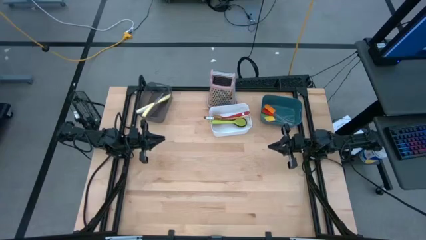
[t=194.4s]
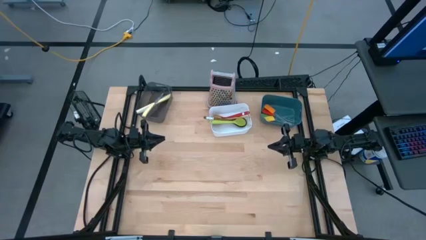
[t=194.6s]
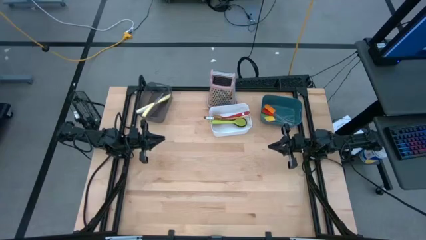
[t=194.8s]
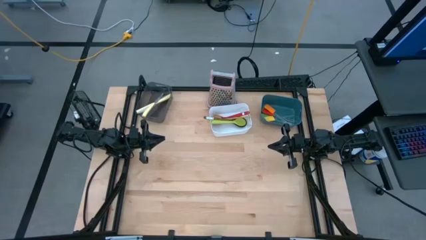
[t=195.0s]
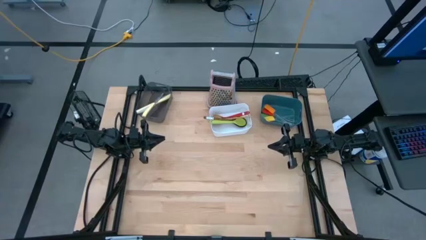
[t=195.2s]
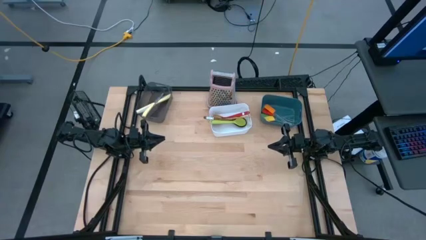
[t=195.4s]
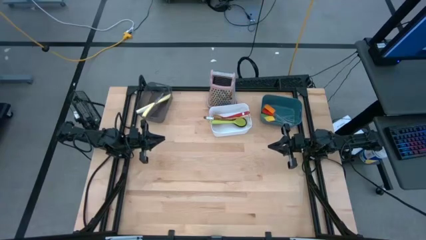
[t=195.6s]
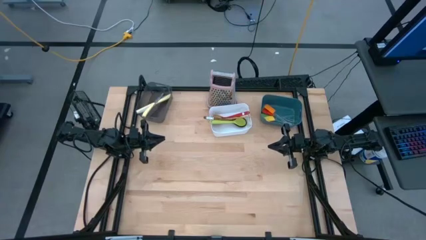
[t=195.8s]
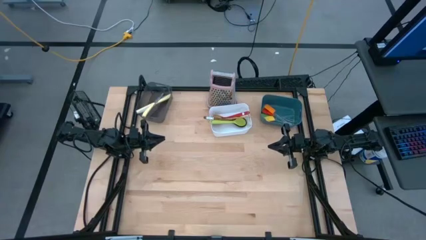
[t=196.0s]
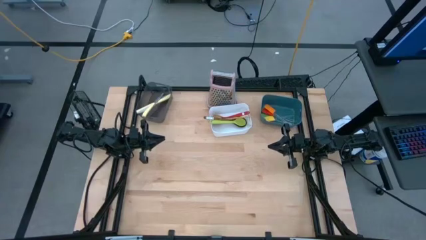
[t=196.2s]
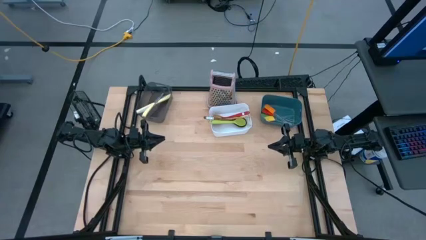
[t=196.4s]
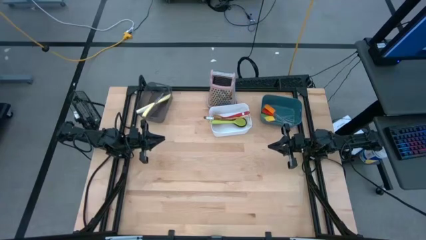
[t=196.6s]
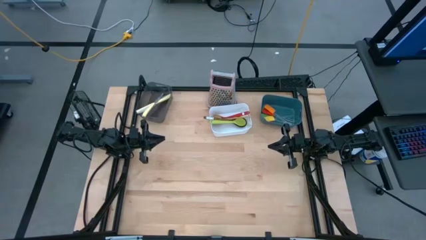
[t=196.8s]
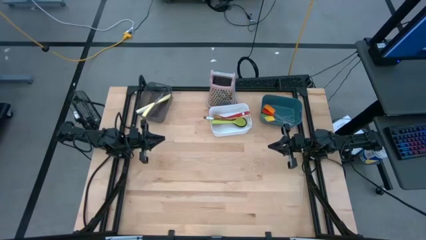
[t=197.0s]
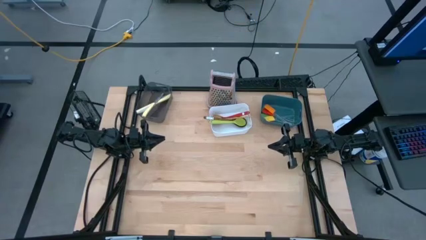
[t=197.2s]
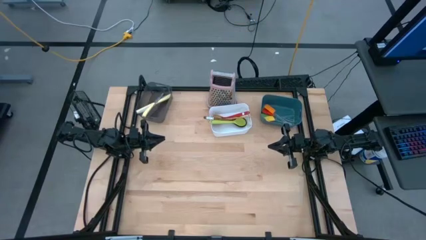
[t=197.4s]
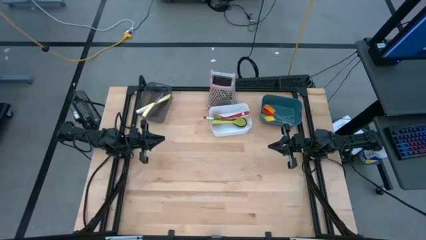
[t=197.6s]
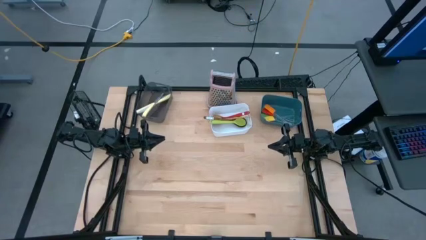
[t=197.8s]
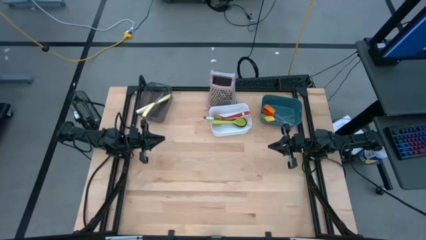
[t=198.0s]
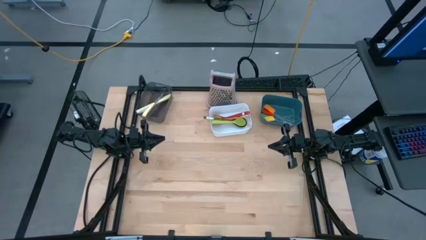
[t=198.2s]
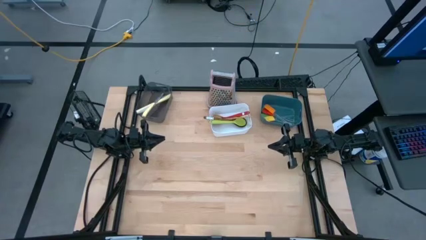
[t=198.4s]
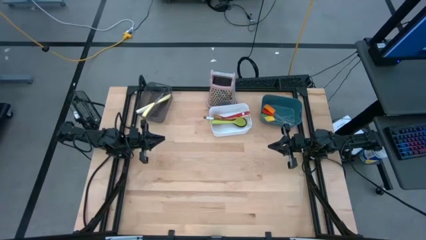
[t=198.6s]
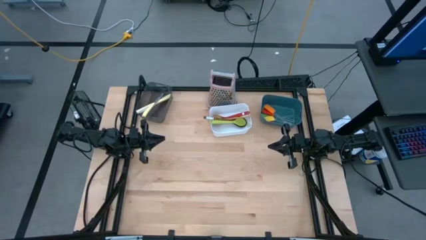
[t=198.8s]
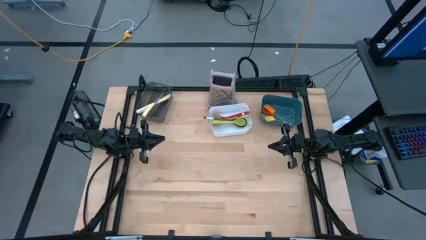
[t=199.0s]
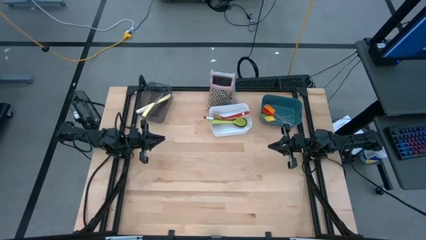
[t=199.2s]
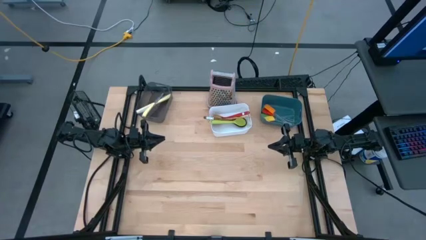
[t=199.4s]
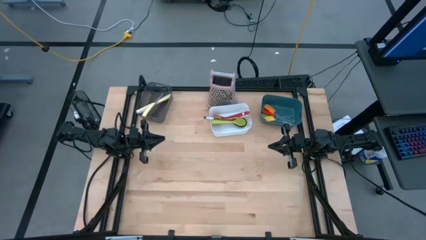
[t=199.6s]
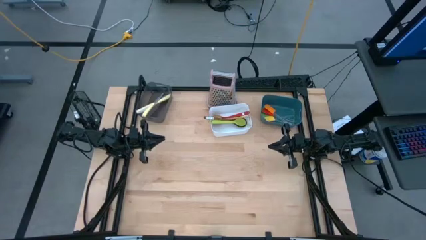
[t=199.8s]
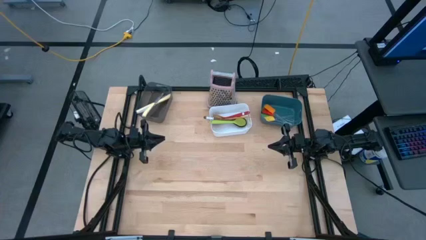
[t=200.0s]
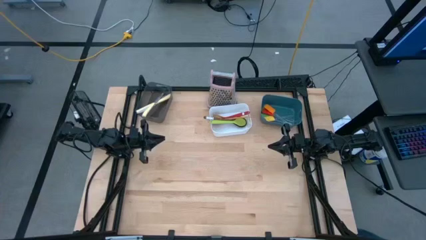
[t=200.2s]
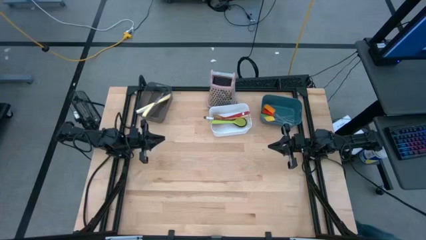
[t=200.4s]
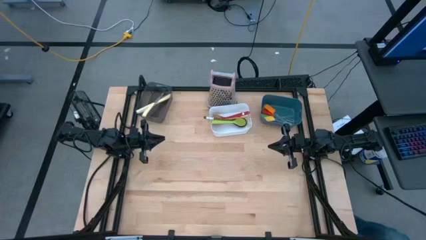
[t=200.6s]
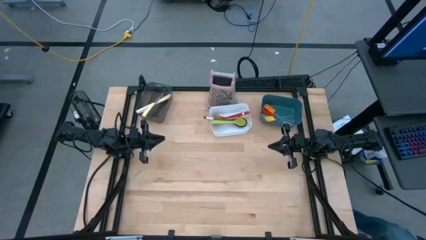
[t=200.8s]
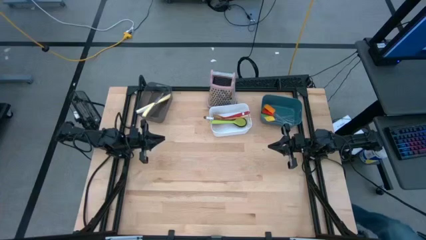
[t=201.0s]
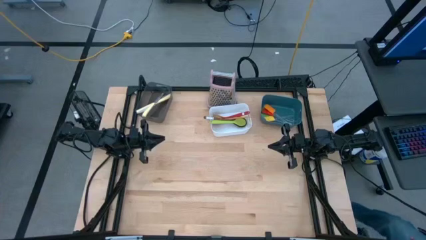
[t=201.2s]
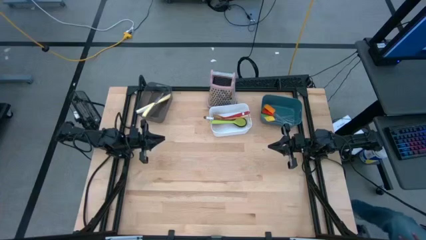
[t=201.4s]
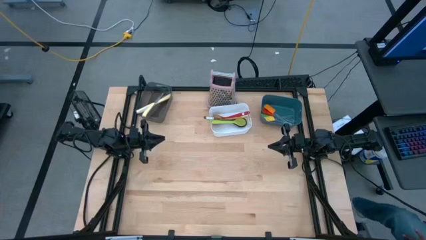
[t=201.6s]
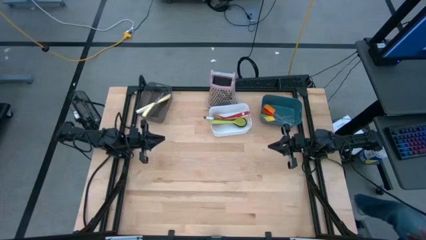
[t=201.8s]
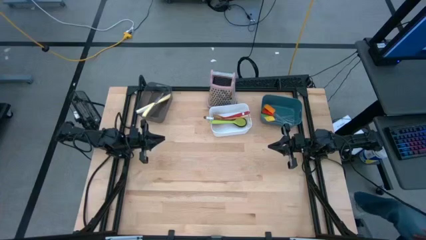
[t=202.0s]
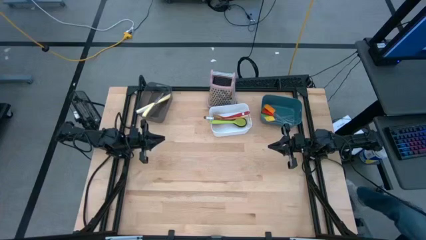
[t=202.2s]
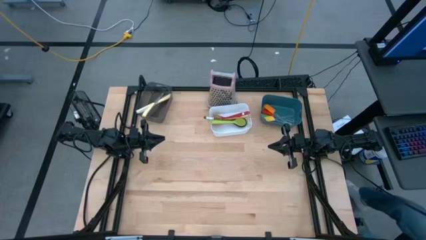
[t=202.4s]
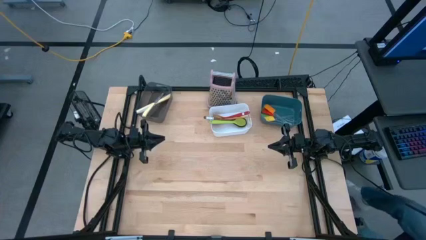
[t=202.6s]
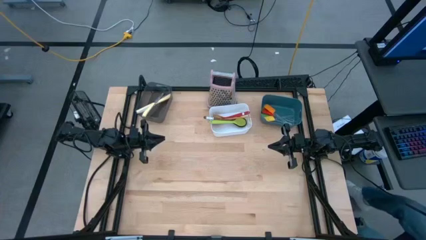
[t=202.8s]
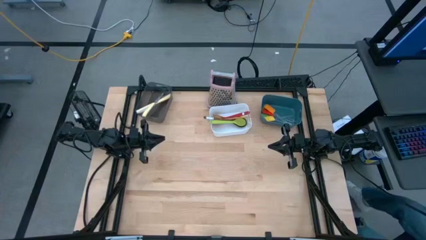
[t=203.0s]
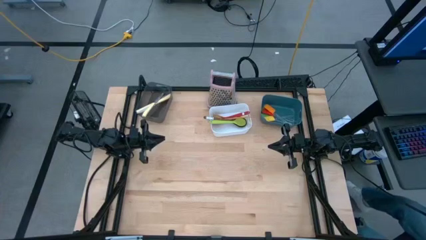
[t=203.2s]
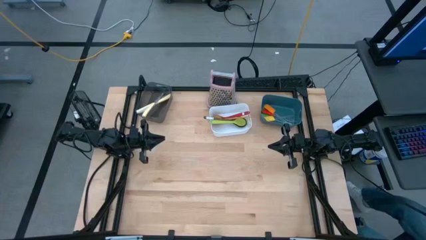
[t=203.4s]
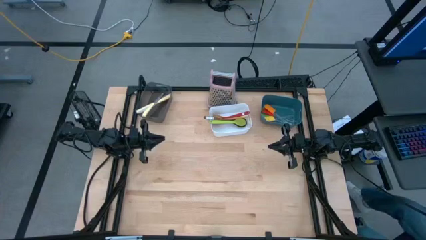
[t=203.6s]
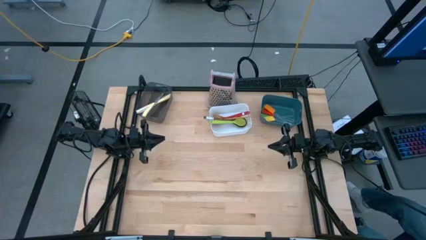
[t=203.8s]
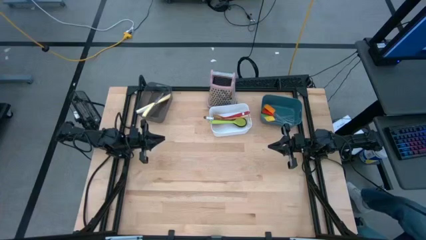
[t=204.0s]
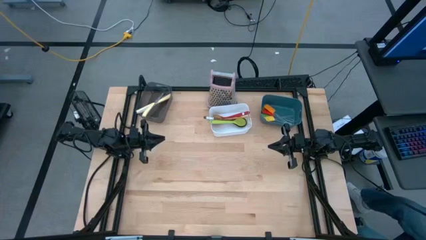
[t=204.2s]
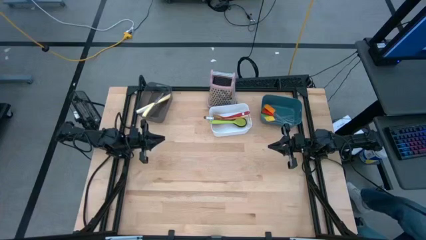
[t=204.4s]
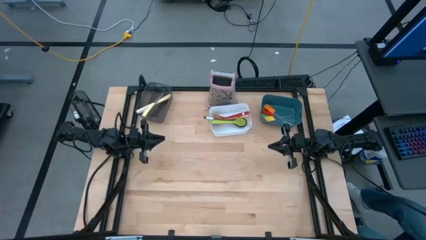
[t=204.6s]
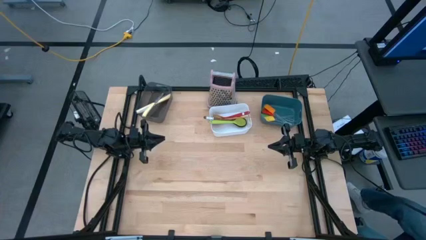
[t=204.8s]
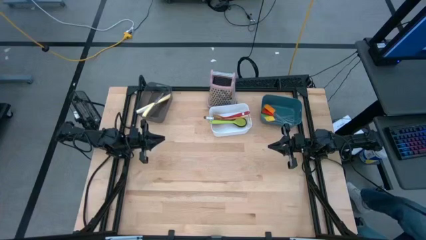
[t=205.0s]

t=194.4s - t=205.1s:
Task: Pick & Place Kitchen Items
Return to Home Position

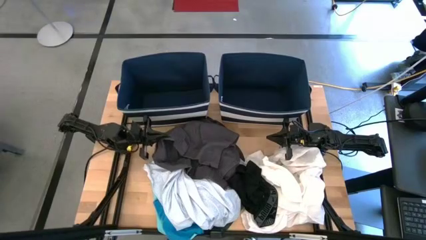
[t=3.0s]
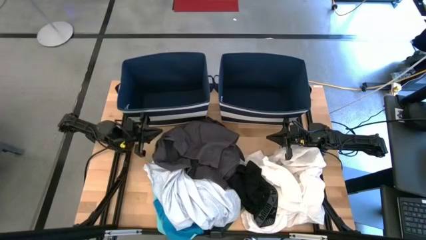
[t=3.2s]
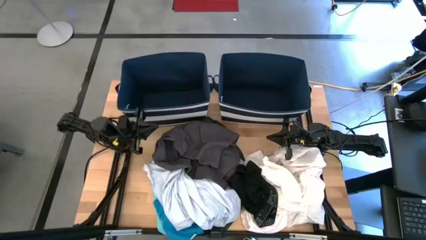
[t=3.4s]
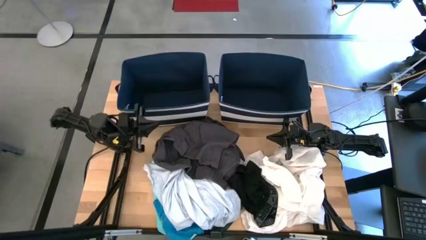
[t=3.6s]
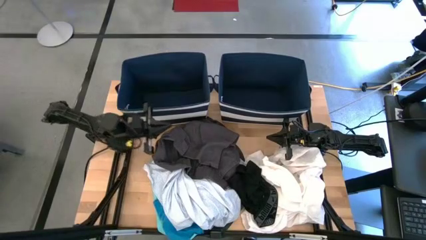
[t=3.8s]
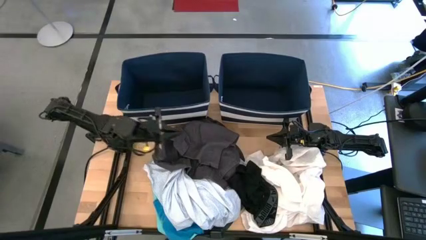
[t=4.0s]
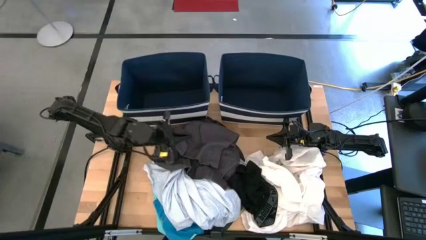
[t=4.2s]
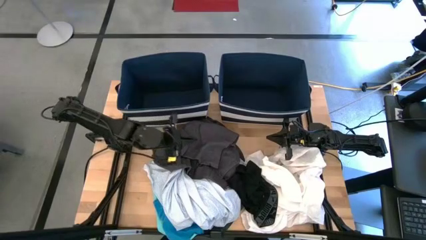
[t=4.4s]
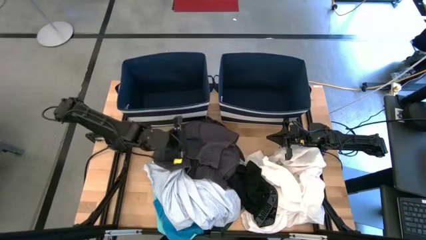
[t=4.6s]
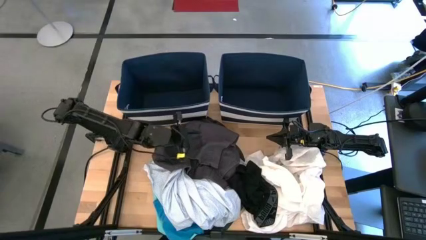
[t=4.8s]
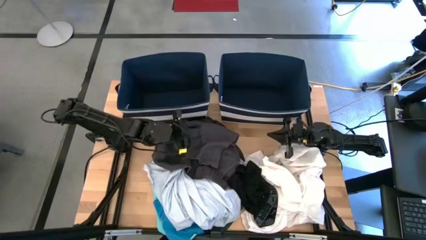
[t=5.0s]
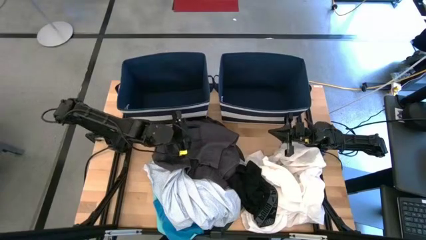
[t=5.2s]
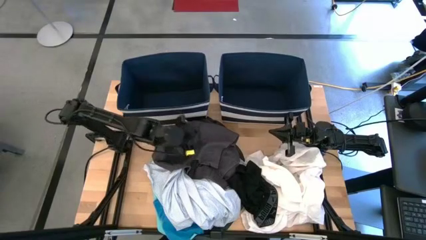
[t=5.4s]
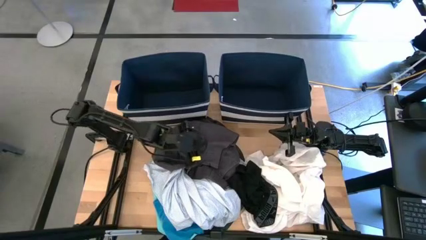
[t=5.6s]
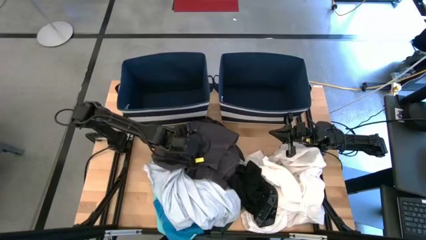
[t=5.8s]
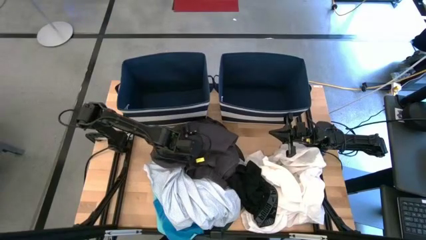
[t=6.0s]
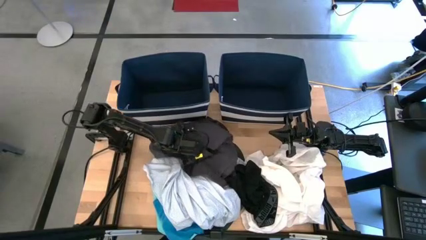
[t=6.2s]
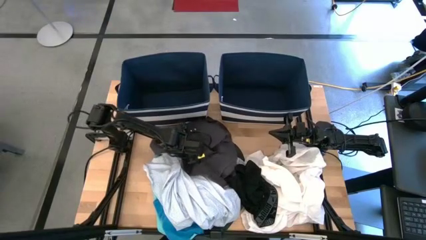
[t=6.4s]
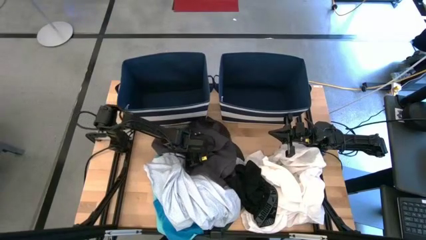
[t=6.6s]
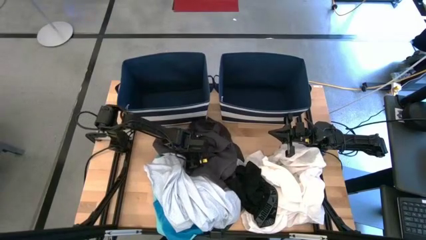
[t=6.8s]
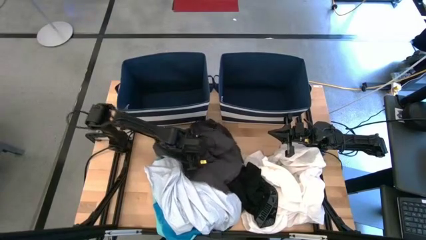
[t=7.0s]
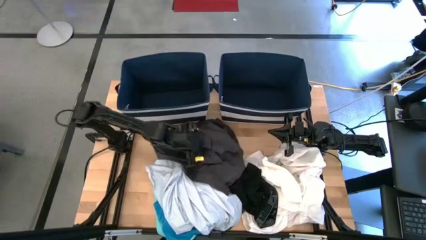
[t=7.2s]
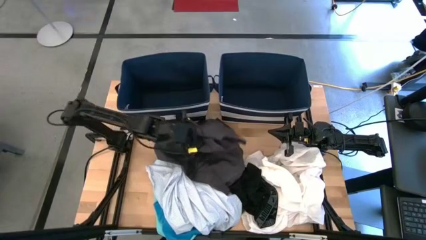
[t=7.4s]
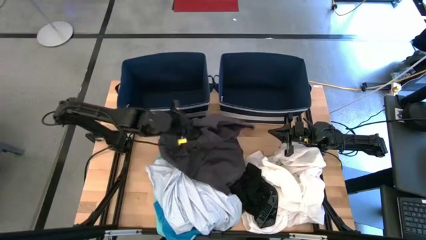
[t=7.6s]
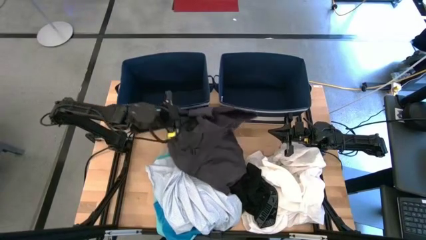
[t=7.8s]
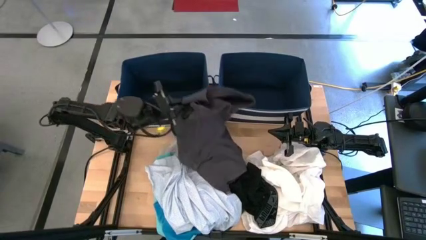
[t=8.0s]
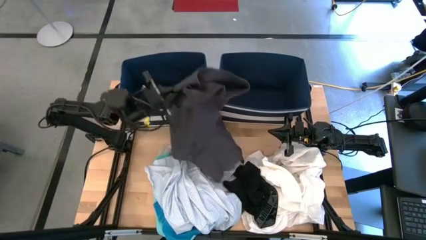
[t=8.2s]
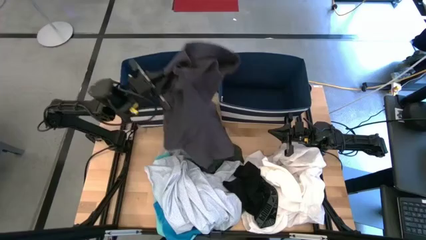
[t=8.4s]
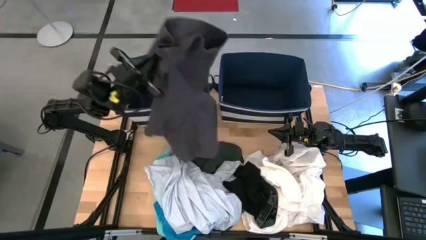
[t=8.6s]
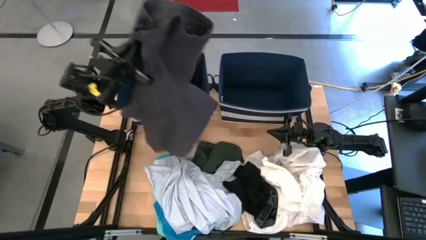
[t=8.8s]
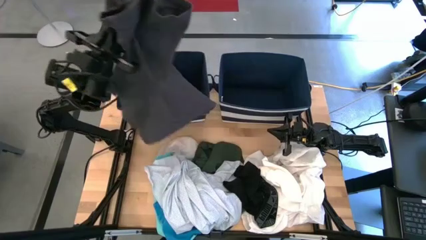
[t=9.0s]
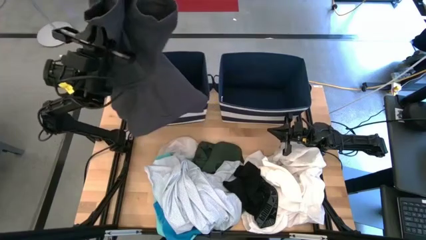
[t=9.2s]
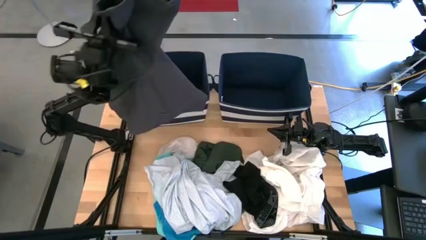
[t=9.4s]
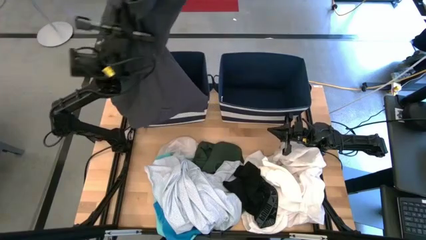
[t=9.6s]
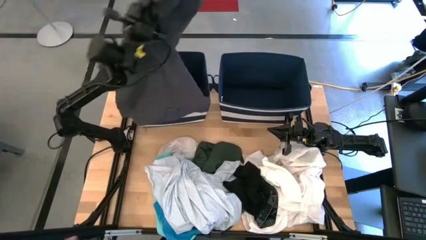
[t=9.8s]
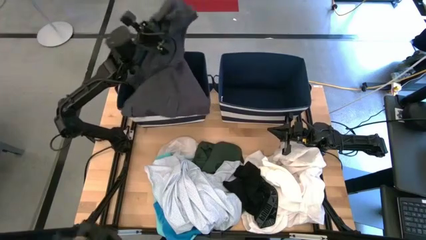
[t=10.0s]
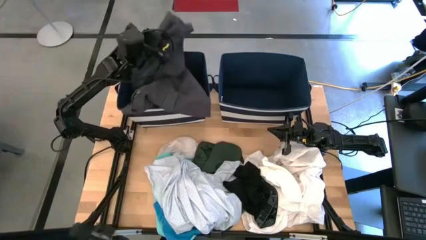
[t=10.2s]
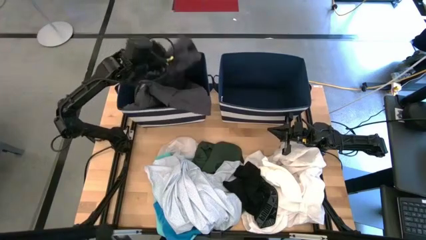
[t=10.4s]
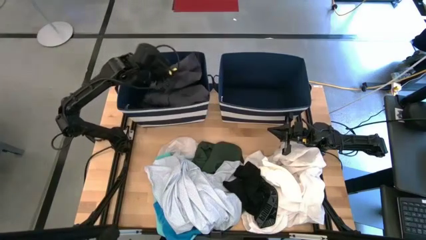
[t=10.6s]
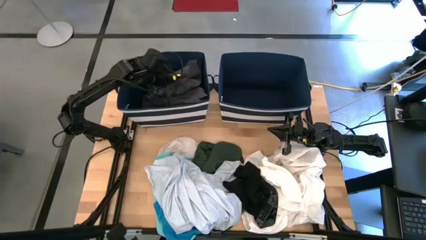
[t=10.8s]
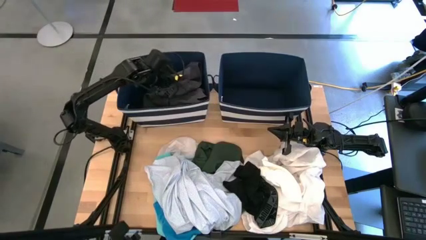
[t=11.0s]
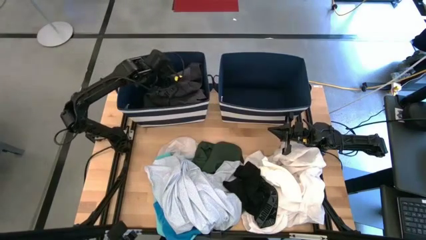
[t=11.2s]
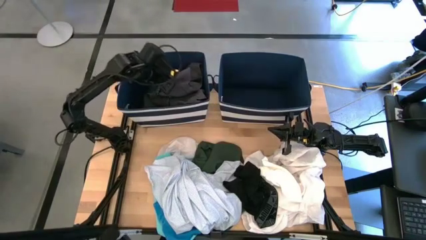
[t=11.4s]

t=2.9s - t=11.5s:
Task: Sort clothes
Put the black shorts into the left blue bin
